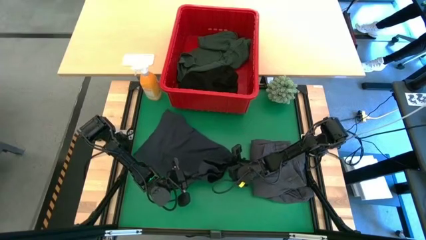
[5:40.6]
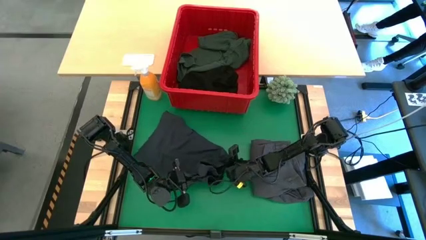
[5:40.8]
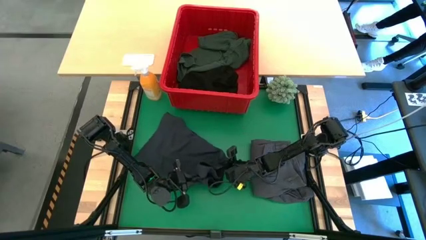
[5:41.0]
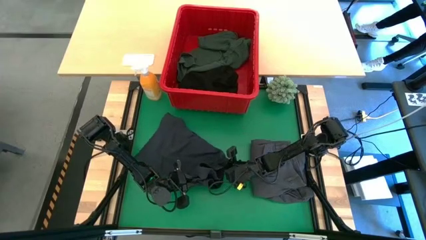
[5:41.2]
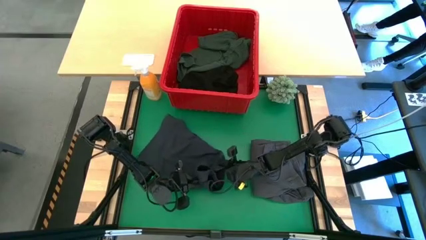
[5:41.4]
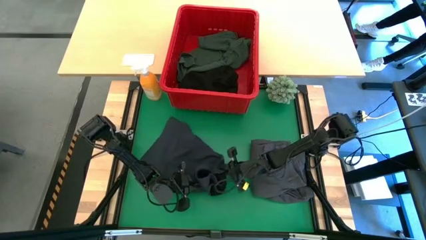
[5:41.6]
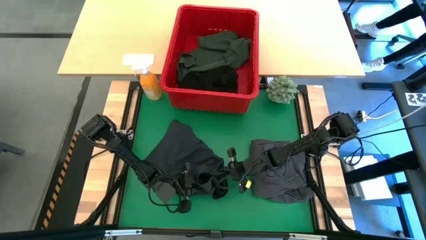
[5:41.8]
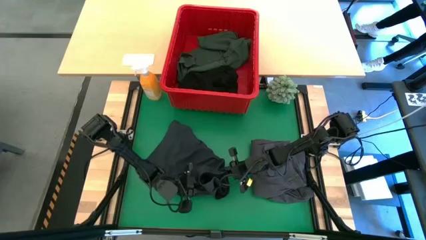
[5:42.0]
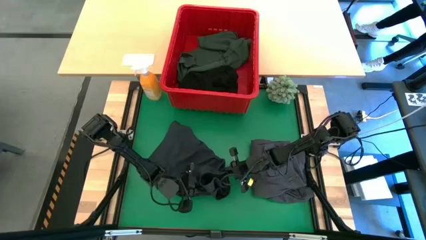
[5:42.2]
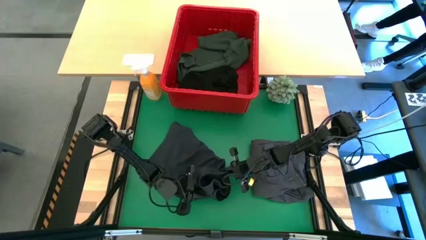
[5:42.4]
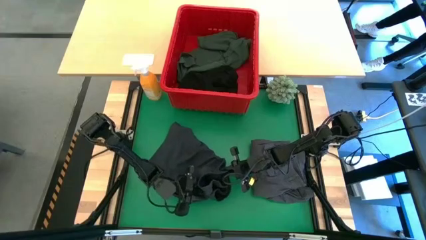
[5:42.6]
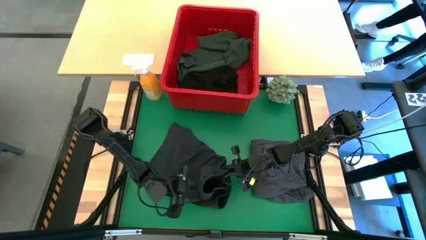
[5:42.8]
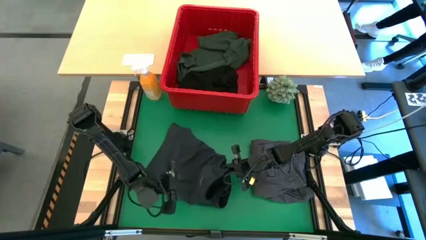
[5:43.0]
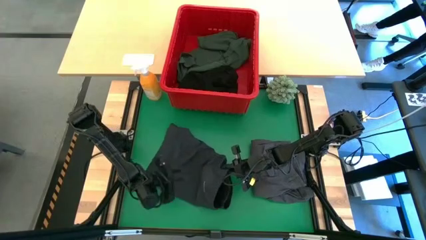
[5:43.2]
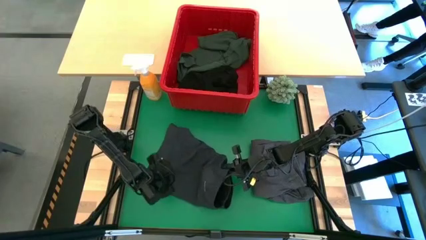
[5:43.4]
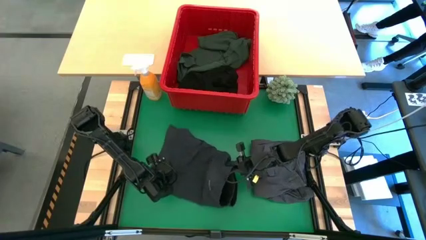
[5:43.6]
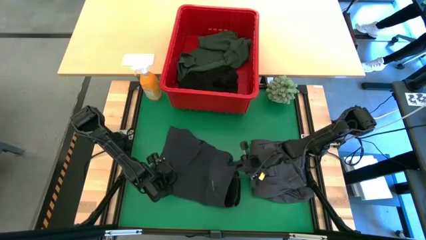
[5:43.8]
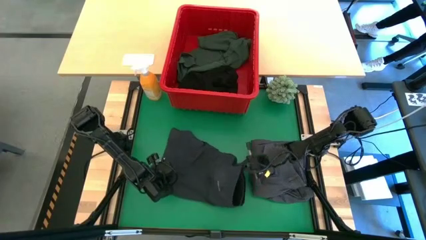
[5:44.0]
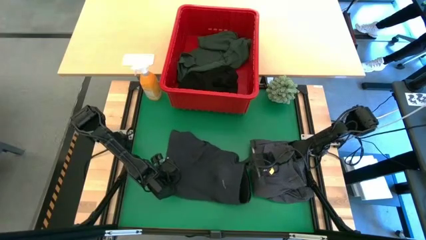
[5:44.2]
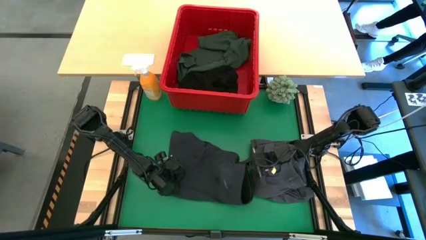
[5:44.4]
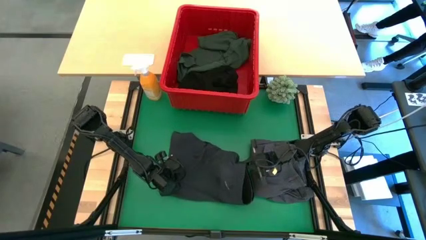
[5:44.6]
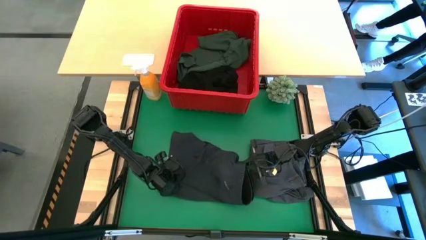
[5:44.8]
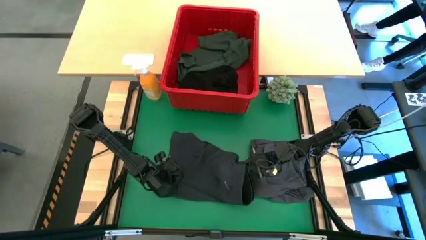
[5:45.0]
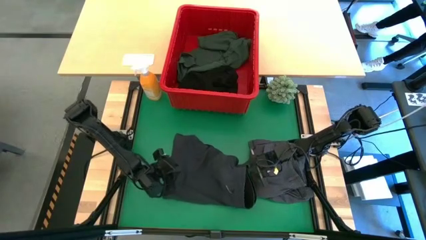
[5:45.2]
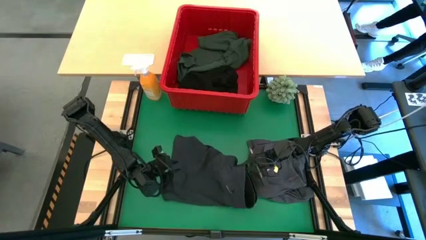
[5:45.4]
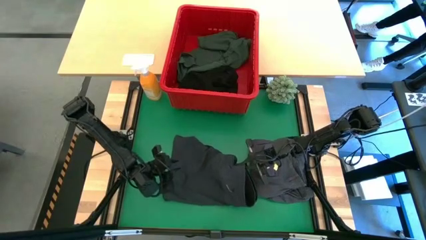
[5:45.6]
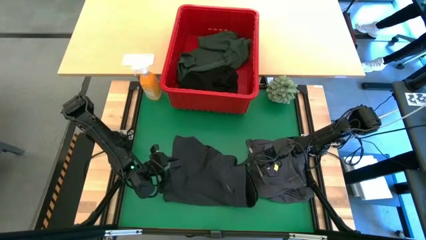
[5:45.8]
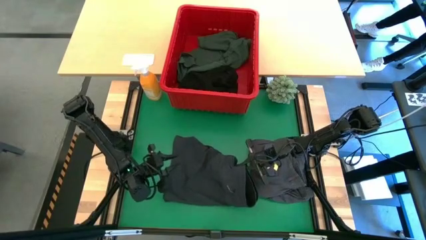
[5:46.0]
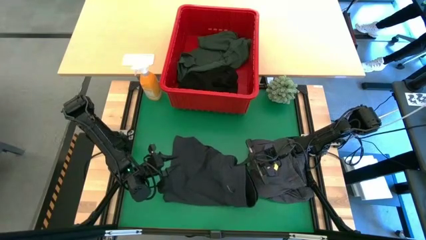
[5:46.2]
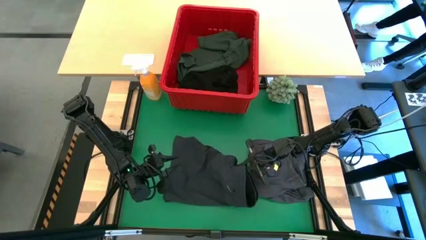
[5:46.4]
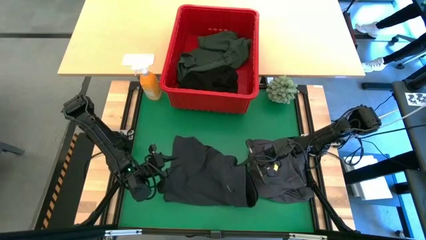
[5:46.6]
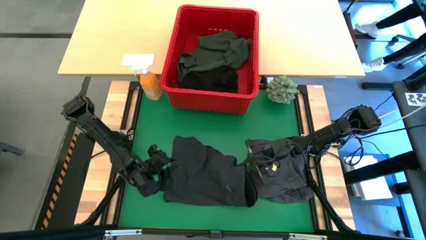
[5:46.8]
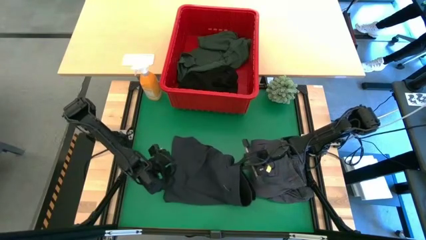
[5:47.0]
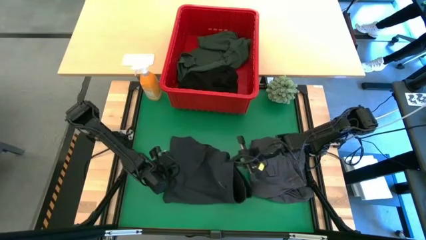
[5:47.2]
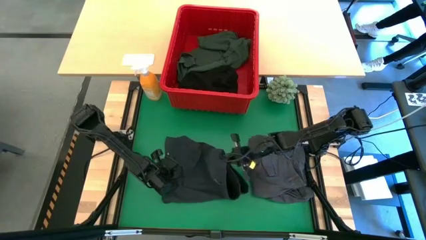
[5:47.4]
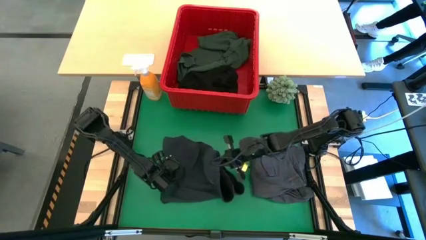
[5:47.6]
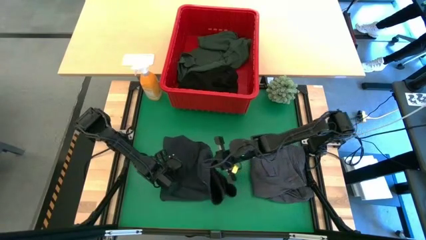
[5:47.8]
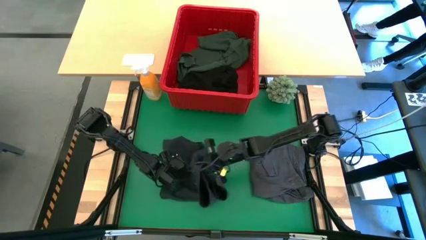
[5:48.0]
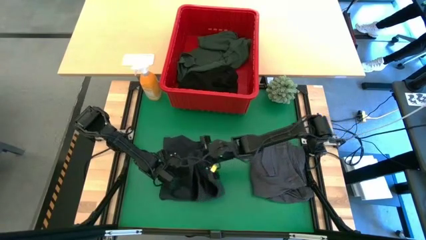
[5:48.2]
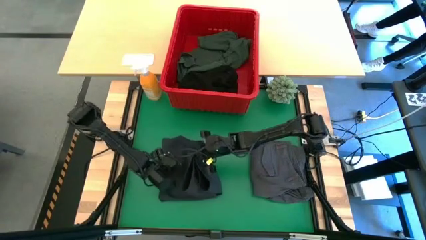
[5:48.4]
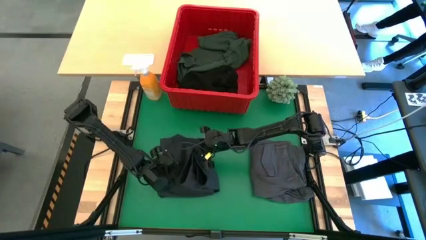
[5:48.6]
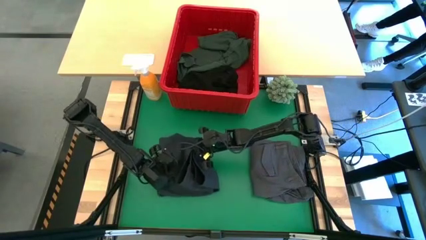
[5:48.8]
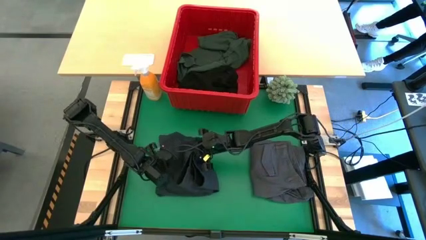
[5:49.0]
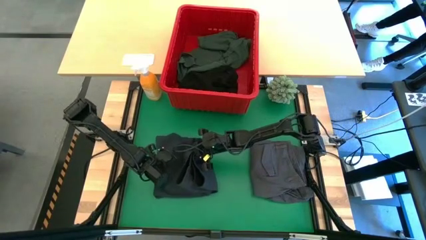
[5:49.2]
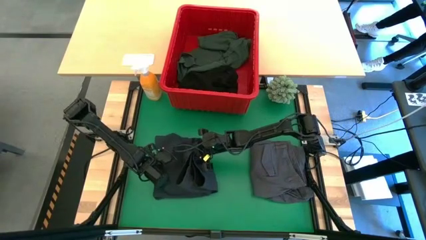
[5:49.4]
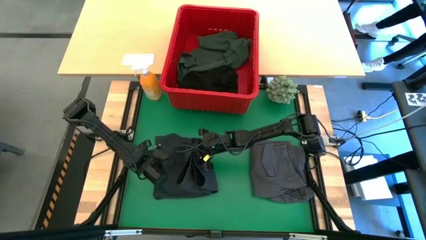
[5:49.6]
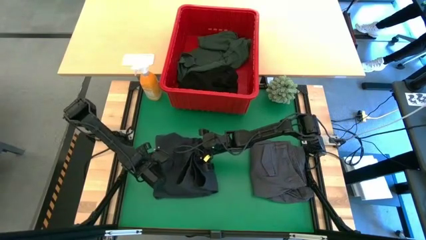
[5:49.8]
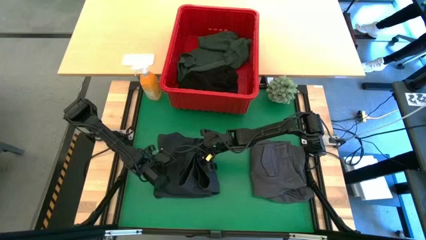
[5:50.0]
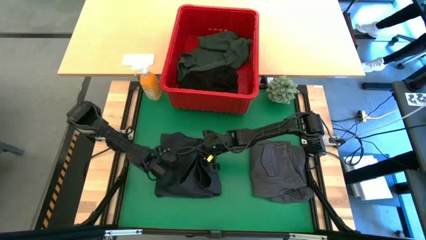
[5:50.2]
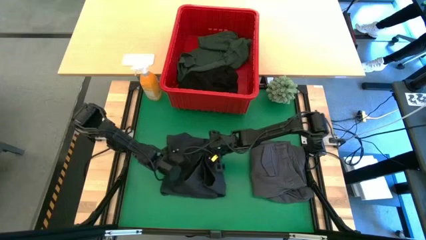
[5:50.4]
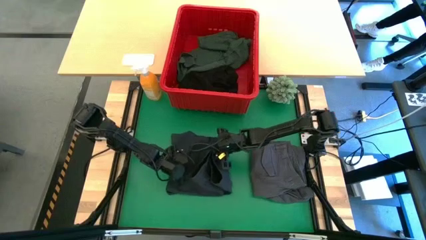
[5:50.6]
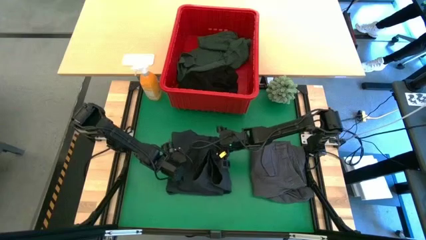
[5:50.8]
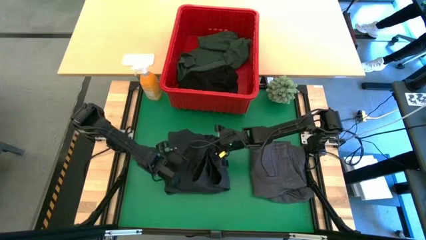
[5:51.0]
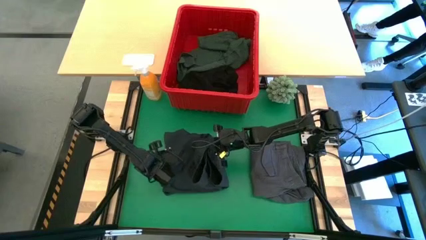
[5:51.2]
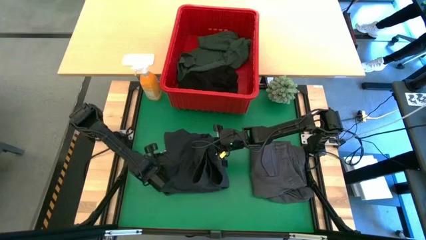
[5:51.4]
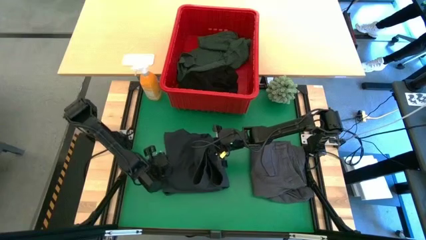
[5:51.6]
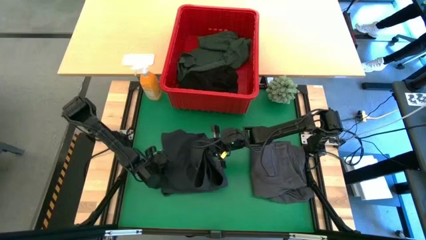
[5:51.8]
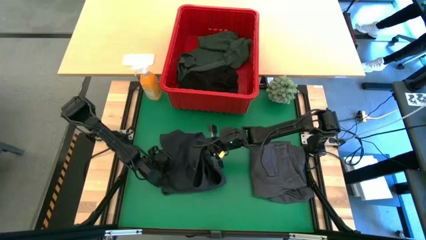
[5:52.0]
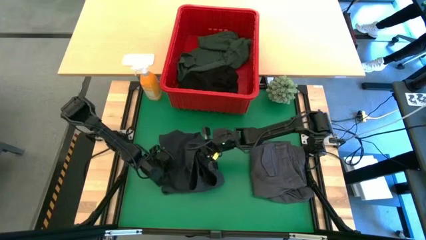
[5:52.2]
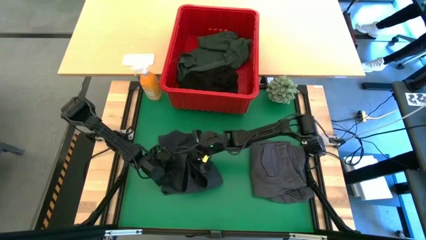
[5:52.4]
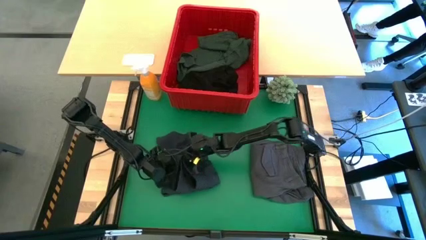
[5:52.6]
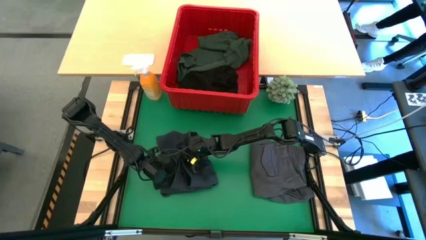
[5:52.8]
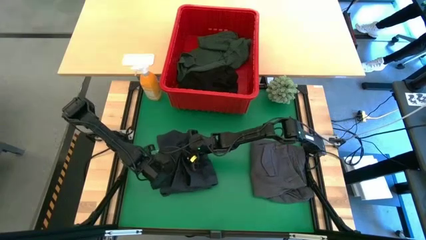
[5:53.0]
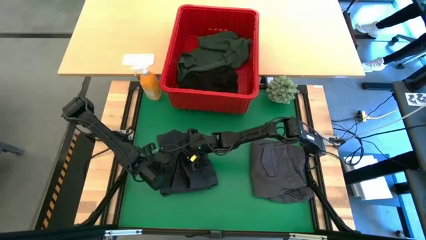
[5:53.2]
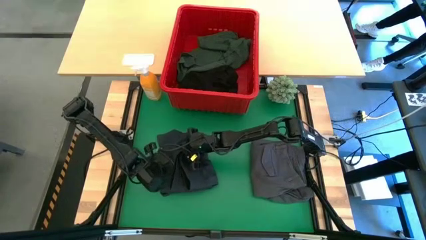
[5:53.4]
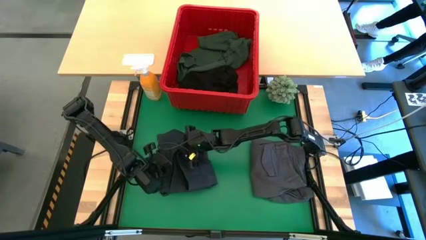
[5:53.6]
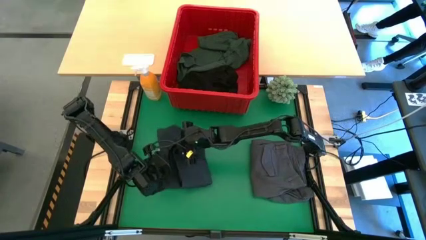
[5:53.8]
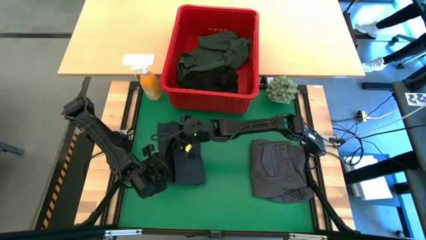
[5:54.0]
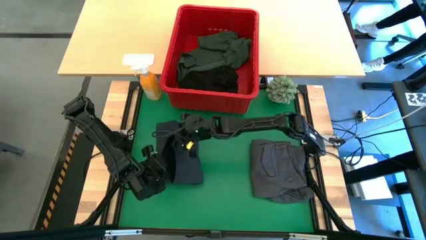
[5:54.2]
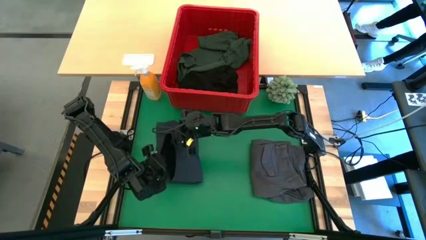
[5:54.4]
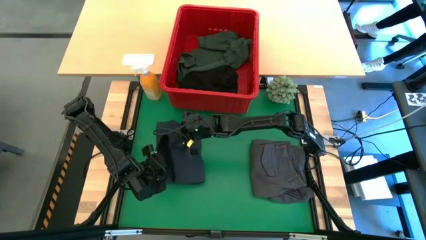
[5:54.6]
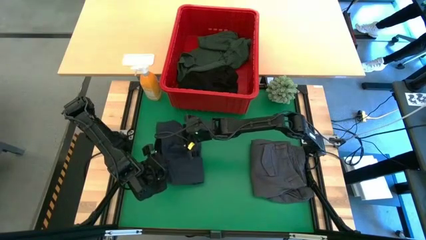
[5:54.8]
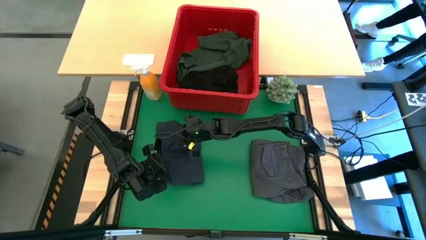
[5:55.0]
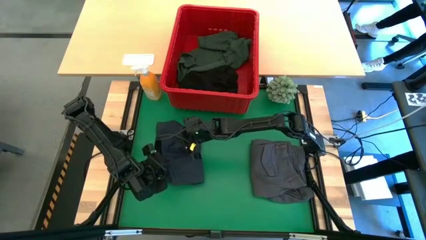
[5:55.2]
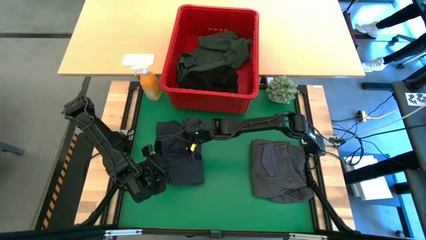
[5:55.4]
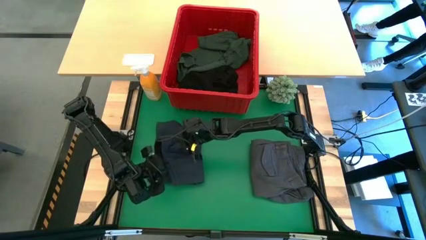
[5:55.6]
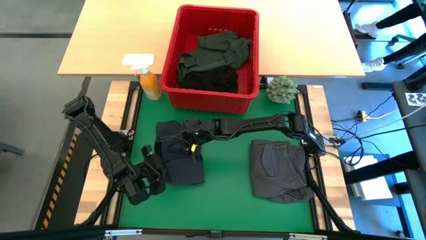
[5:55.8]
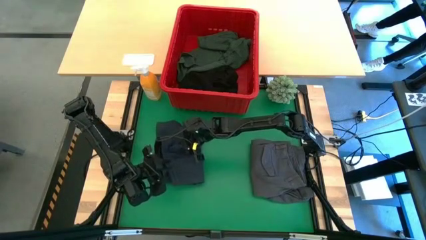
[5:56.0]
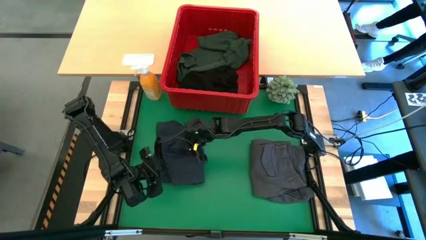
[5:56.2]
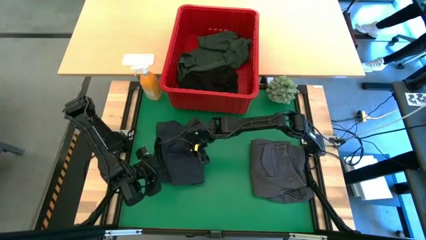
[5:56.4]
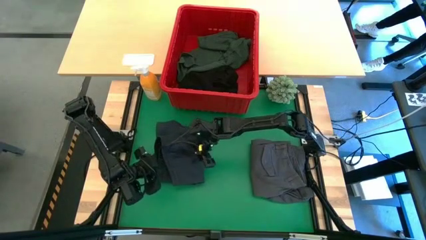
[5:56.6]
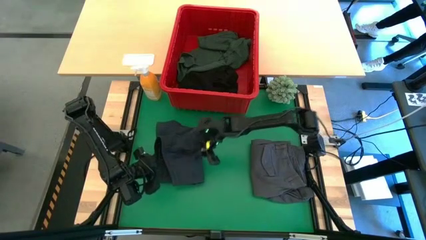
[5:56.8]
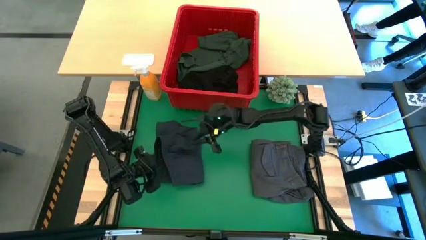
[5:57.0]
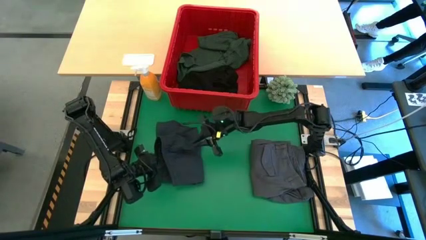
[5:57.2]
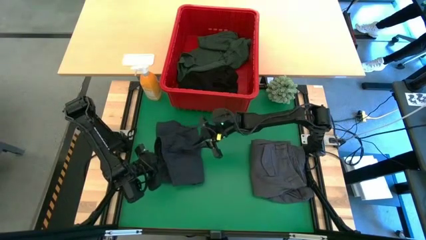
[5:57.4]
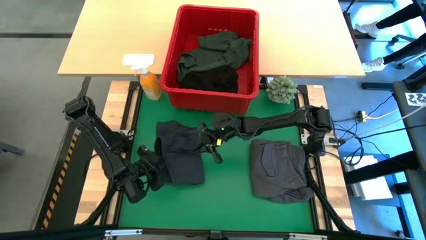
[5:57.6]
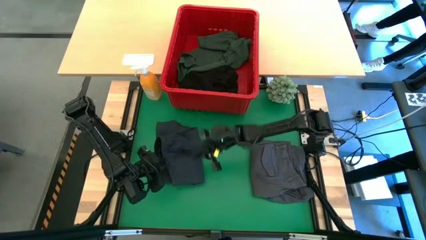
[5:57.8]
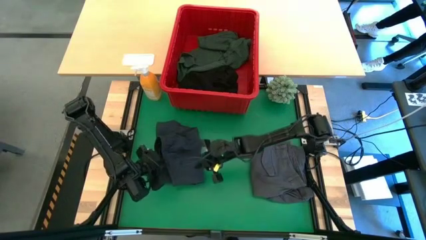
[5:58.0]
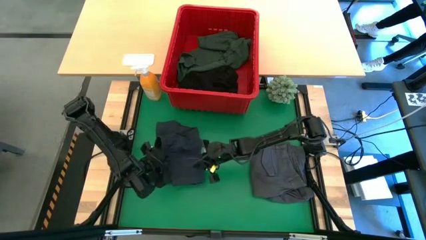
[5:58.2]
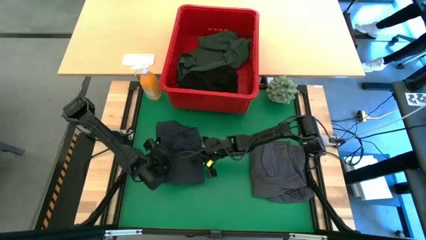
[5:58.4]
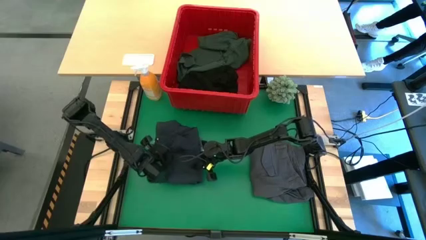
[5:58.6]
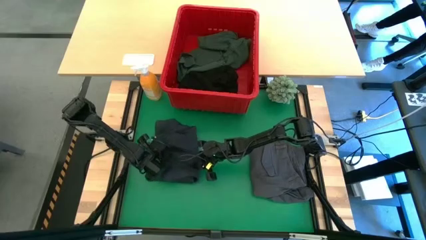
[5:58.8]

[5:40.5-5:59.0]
Task: Fold Laundry from Bin
Fold the dark gray short
